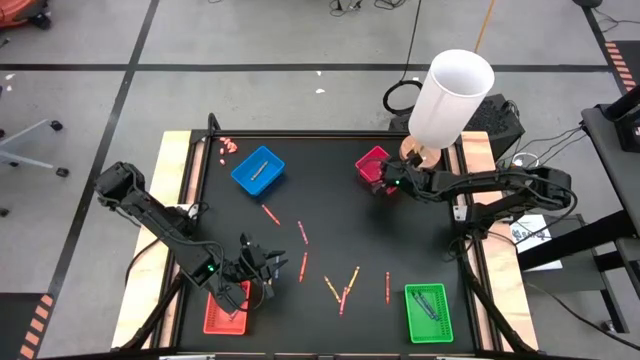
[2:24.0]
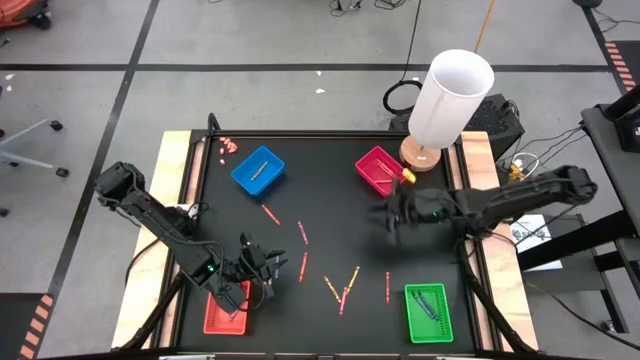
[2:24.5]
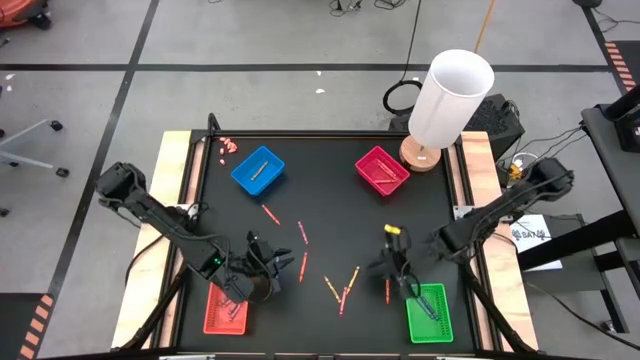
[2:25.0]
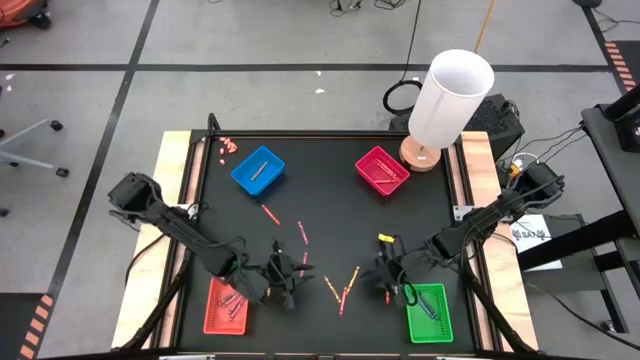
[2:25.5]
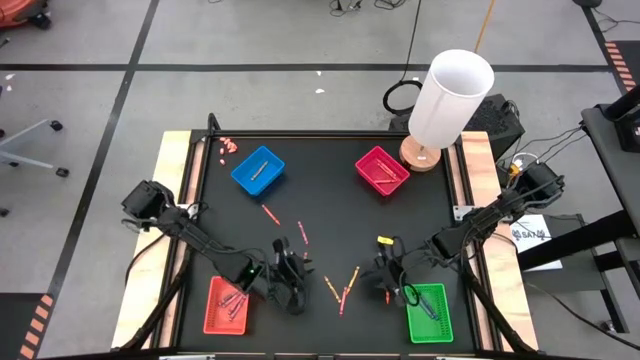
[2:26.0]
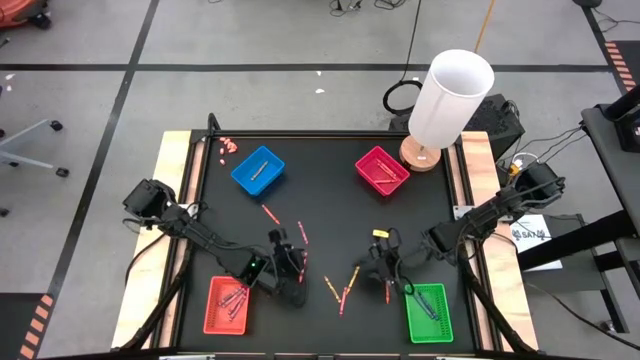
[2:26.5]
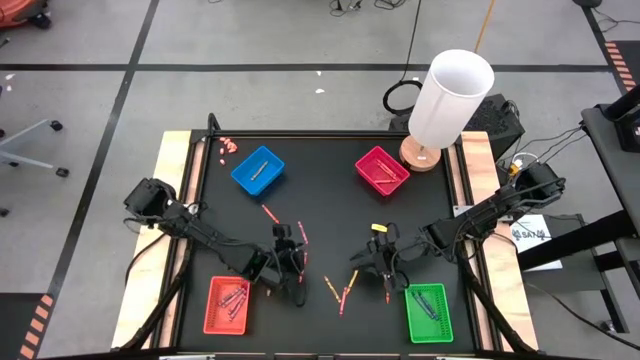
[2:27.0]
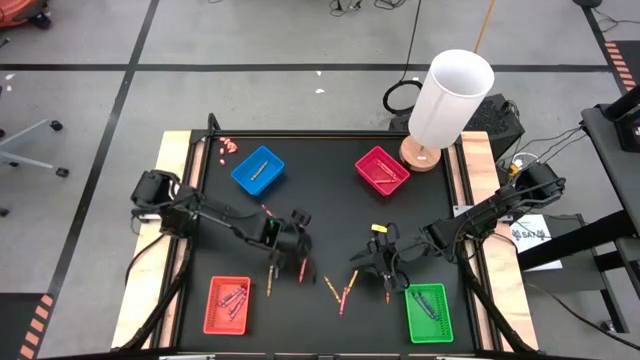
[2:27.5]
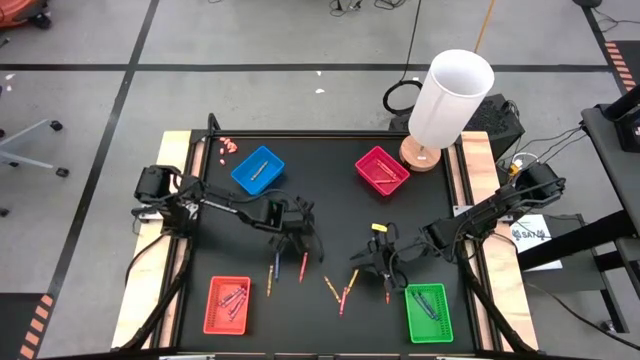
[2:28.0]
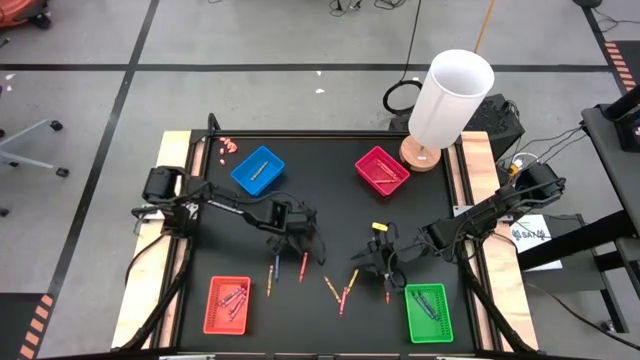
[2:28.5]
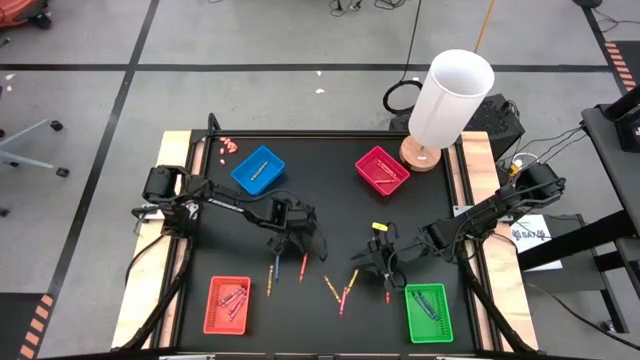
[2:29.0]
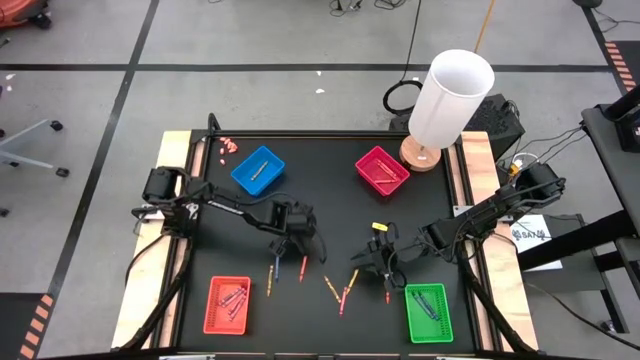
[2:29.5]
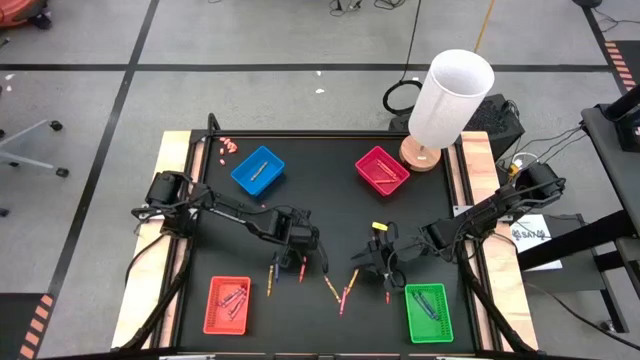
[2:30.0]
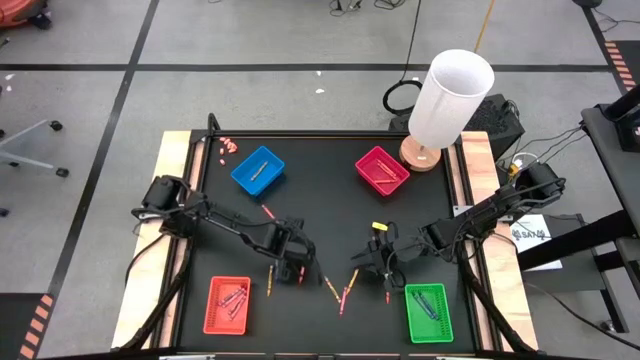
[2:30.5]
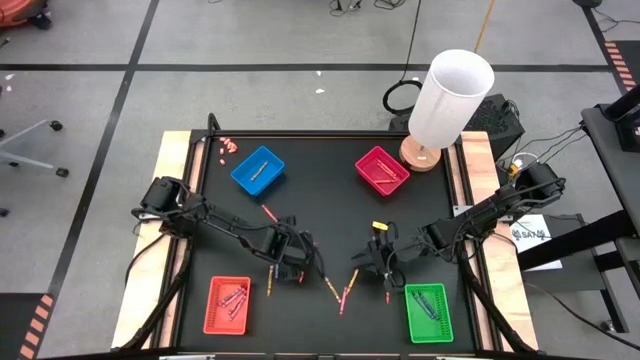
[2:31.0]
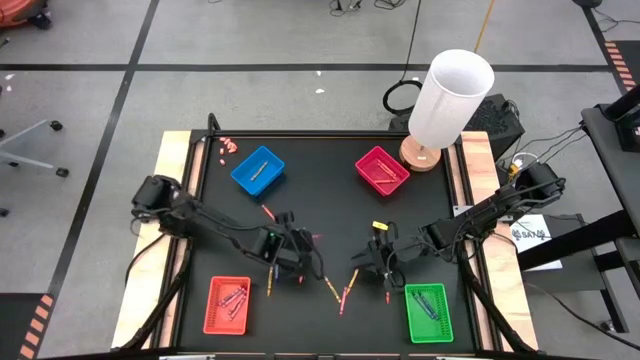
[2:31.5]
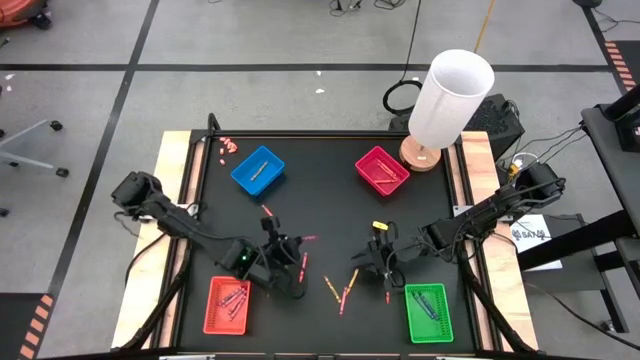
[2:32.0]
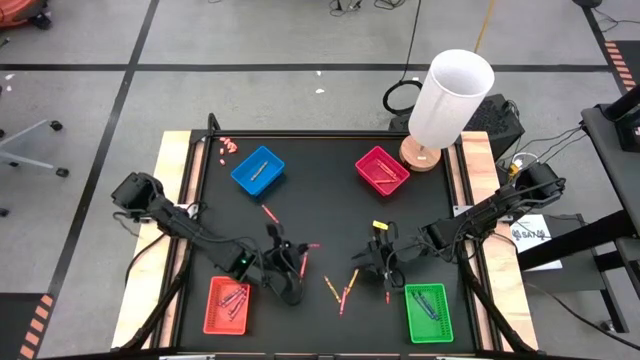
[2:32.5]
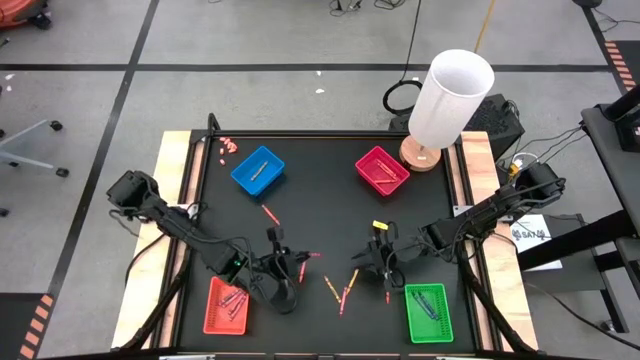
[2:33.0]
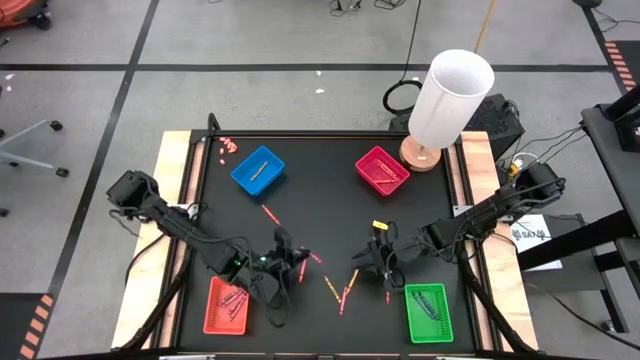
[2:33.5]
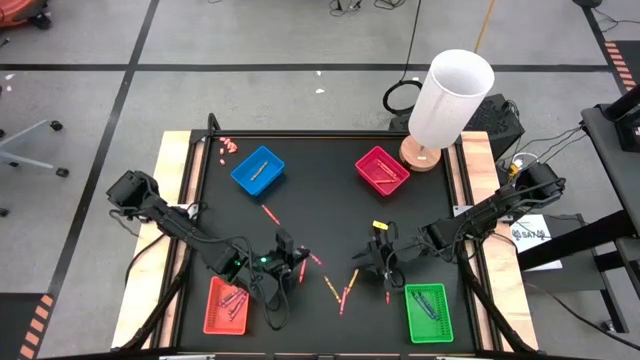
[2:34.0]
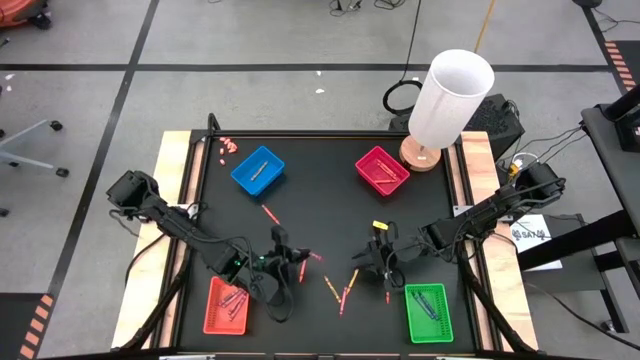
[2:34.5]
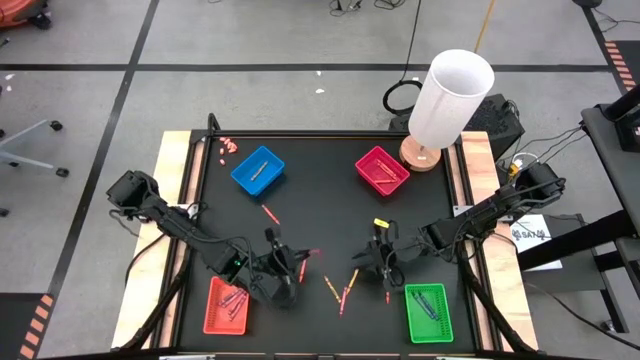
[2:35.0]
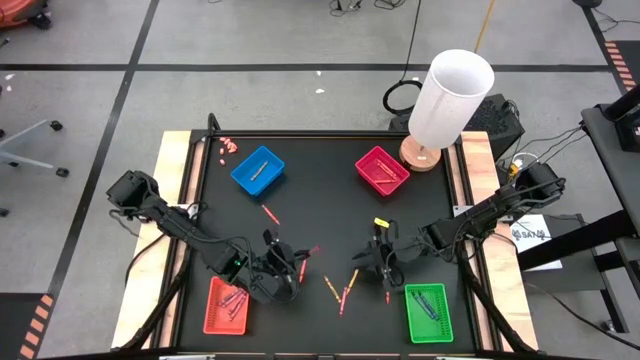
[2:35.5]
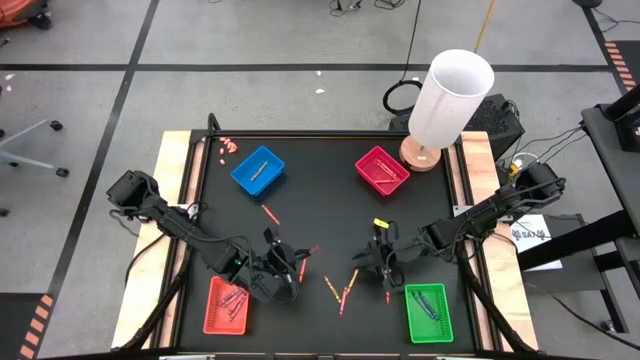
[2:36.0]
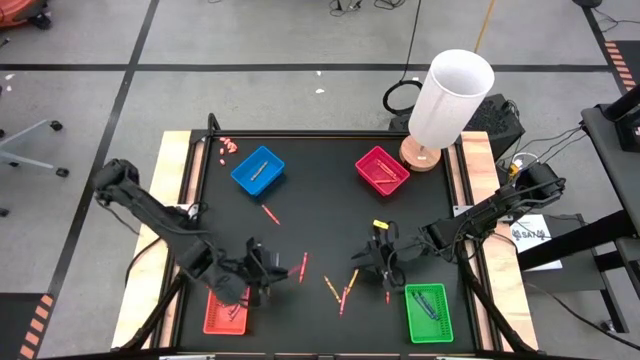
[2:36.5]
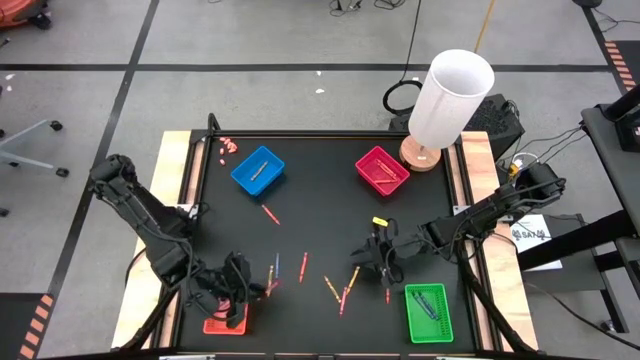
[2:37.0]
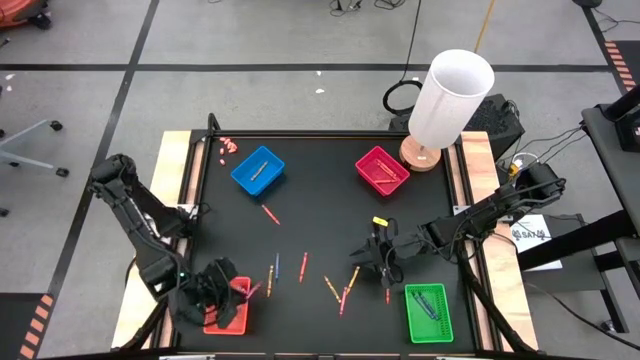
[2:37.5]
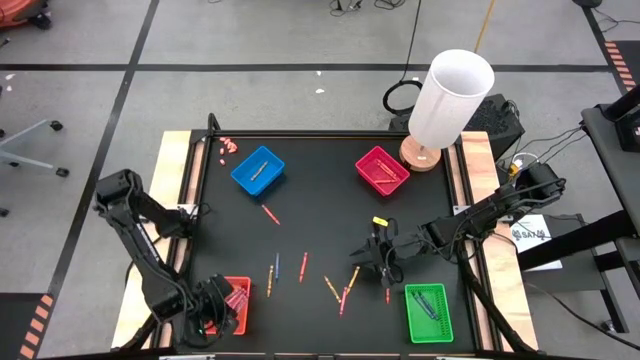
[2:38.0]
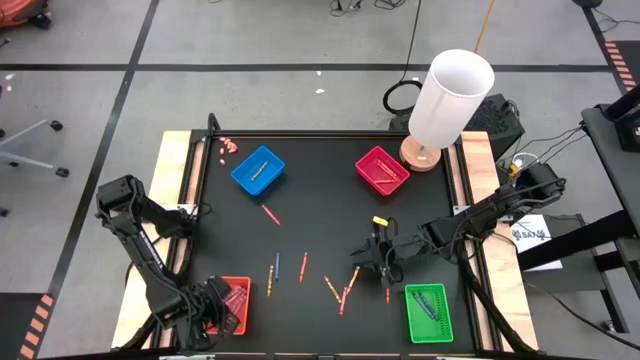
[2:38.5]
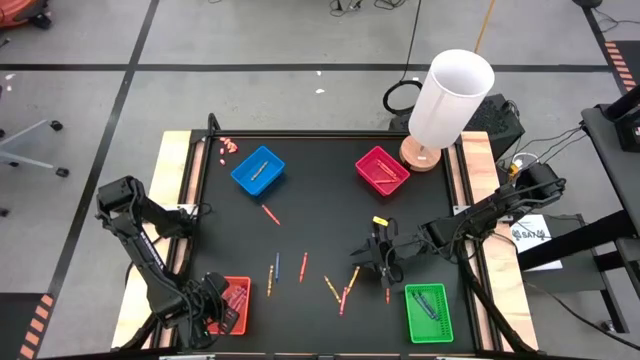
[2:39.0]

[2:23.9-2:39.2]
Task: Sort crayons
Put the red crayon into the orange bin

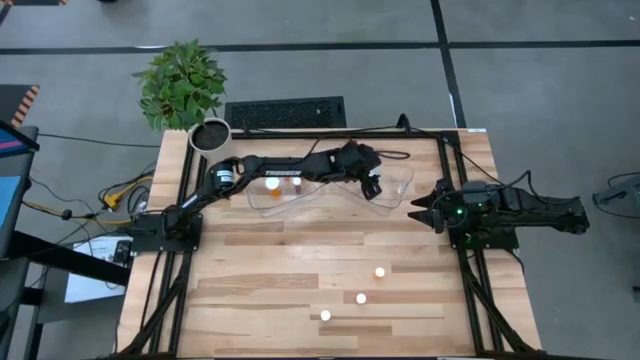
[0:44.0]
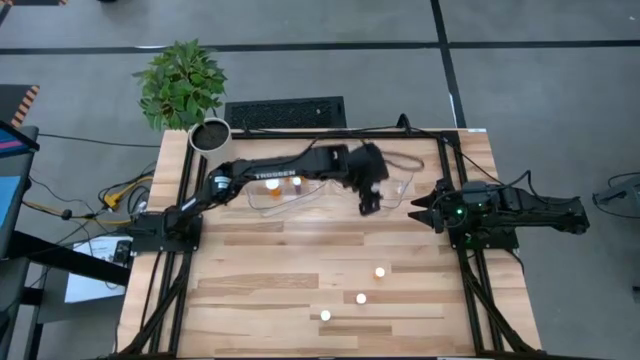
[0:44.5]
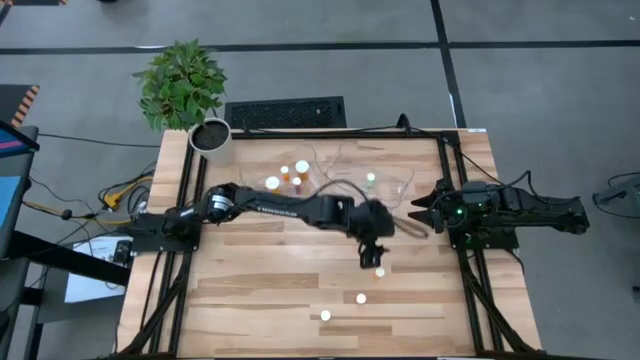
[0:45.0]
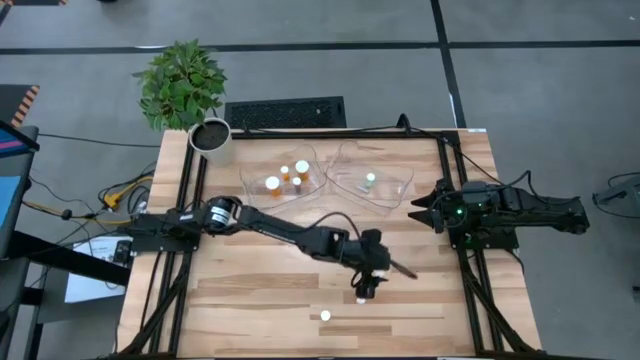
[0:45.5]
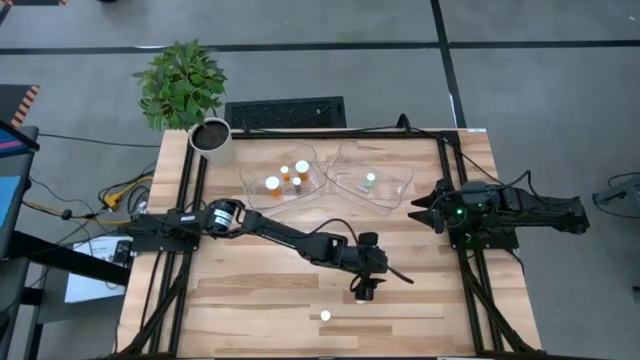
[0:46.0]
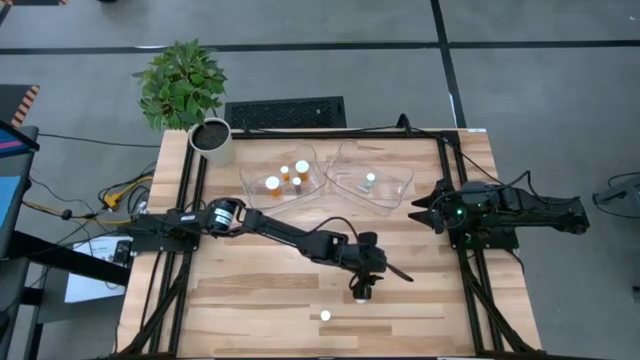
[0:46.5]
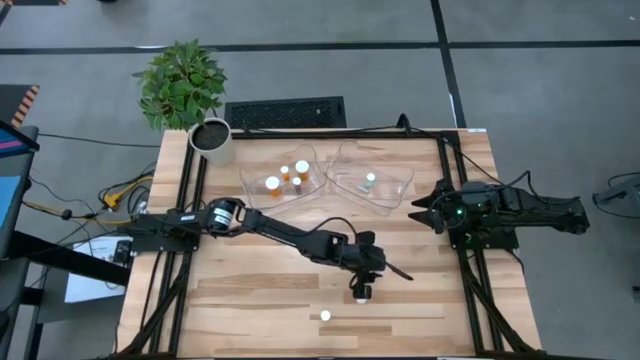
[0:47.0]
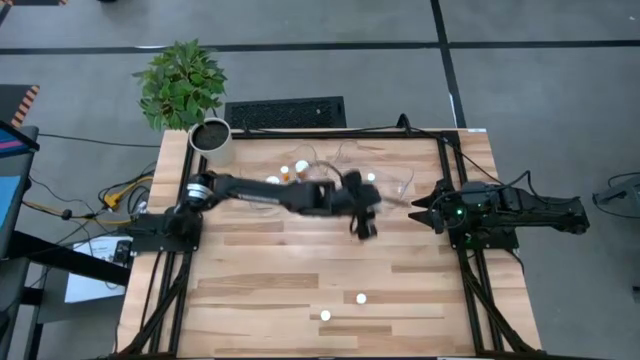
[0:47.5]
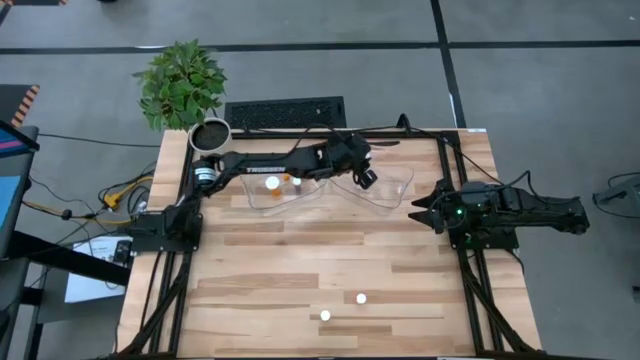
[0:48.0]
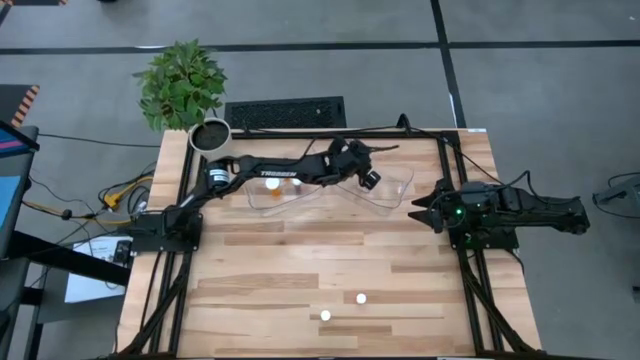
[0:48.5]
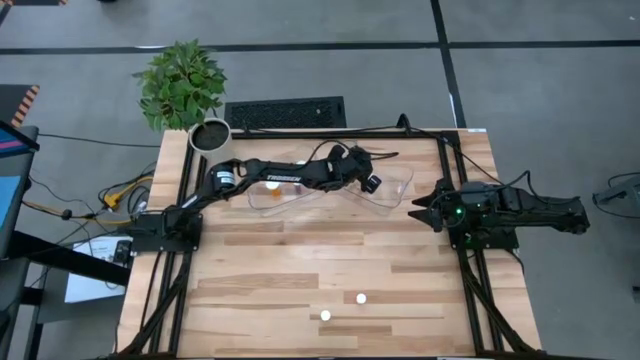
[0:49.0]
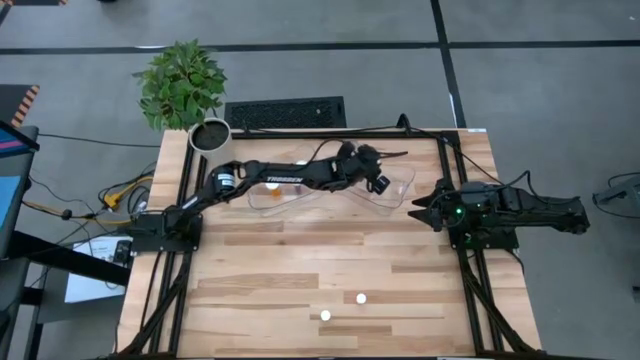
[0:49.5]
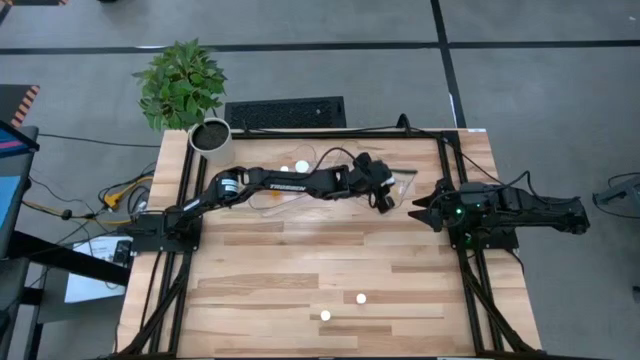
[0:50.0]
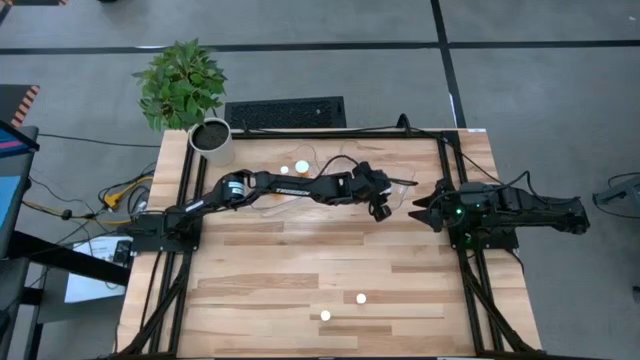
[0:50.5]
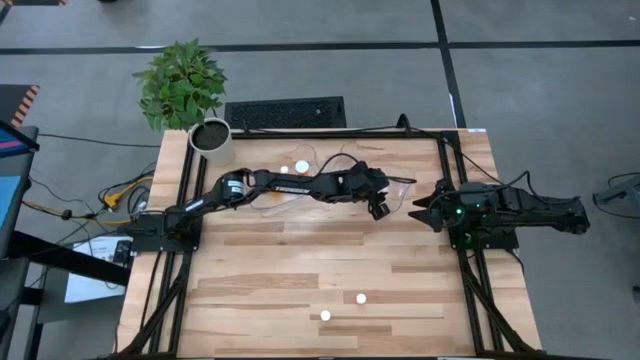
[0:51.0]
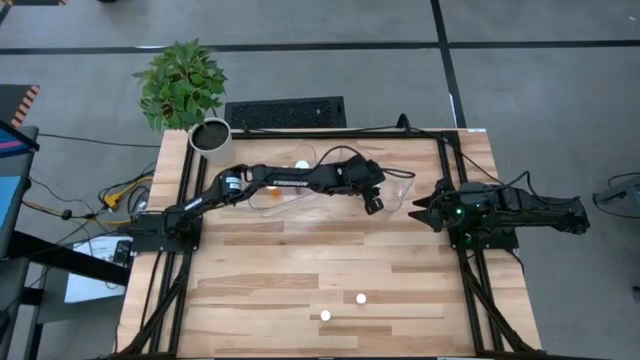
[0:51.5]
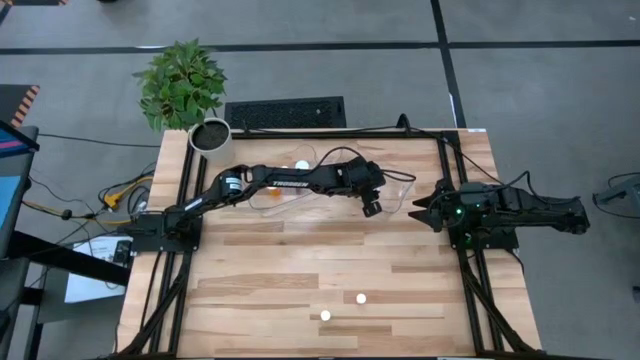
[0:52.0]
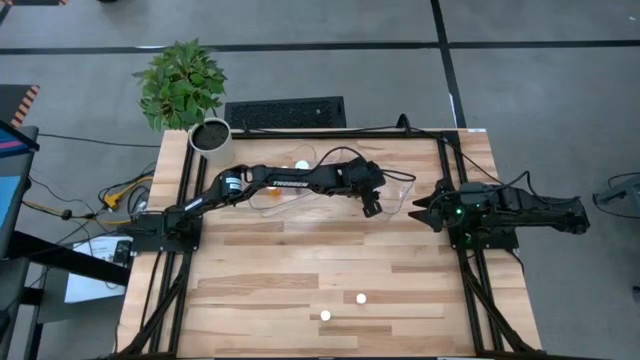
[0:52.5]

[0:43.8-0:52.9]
Task: Pick and place medicine bottles into bin by pill shape (circle, oval)
Put the small orange tablet bottle into the right transparent bin
